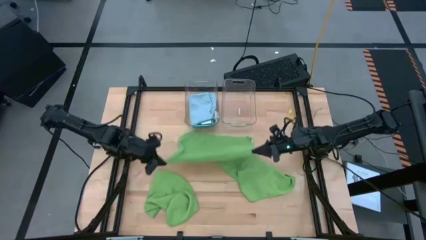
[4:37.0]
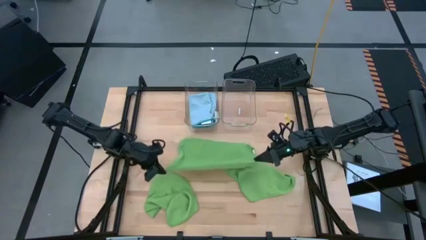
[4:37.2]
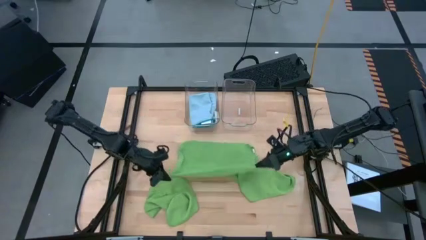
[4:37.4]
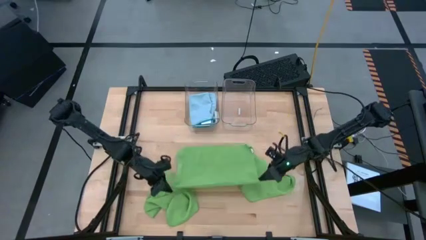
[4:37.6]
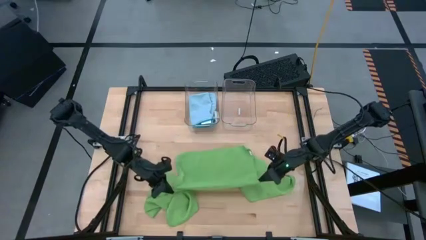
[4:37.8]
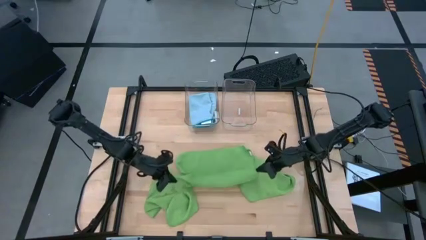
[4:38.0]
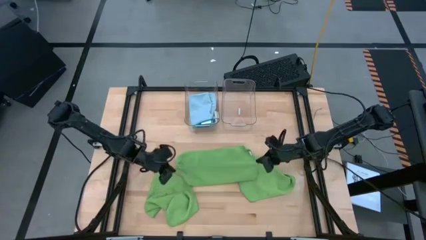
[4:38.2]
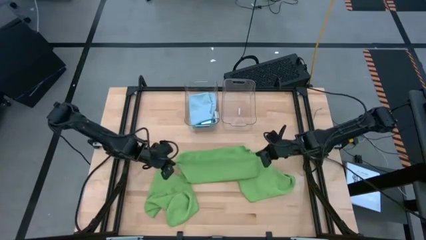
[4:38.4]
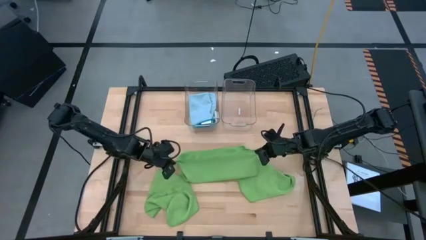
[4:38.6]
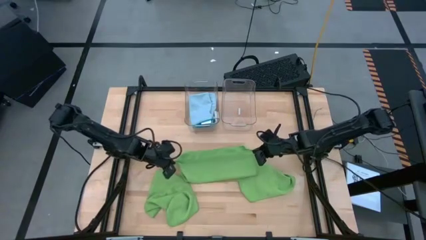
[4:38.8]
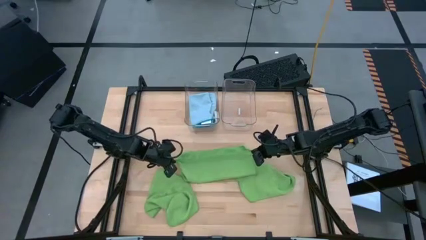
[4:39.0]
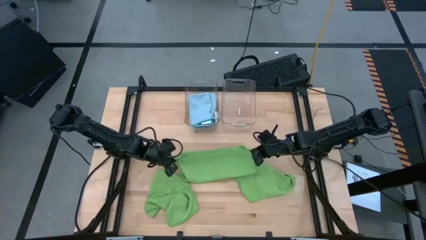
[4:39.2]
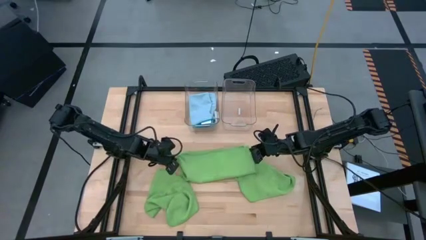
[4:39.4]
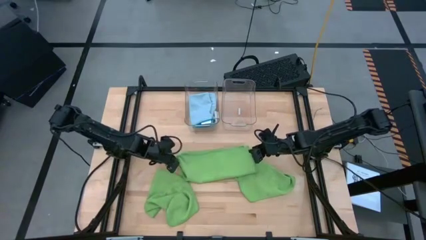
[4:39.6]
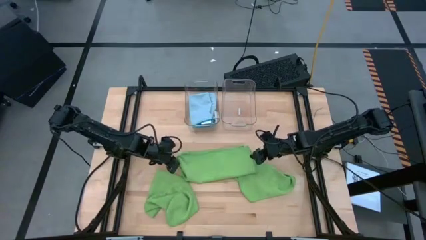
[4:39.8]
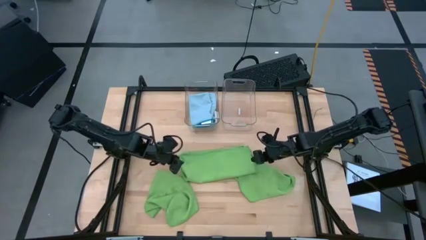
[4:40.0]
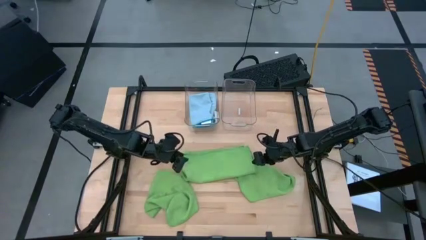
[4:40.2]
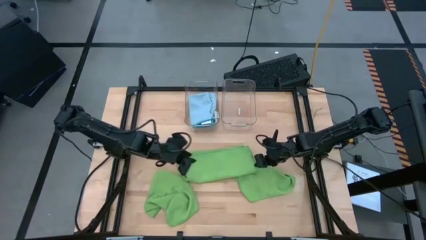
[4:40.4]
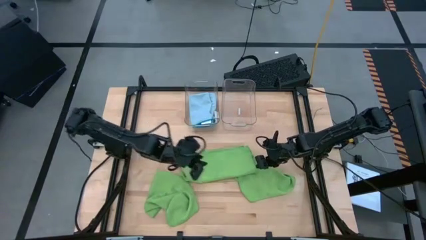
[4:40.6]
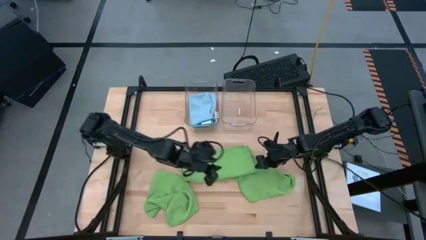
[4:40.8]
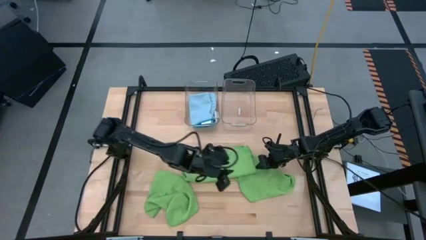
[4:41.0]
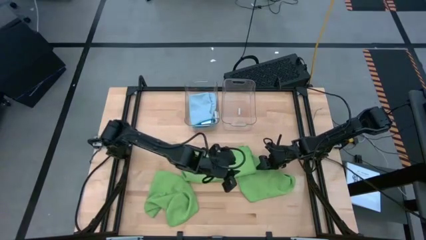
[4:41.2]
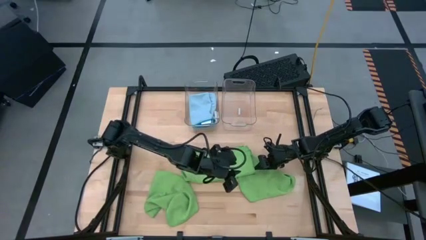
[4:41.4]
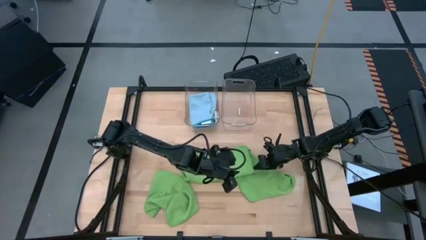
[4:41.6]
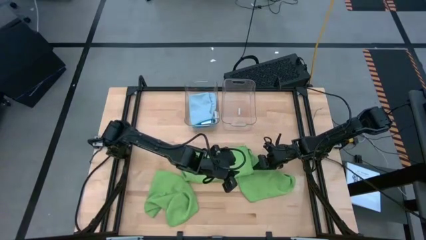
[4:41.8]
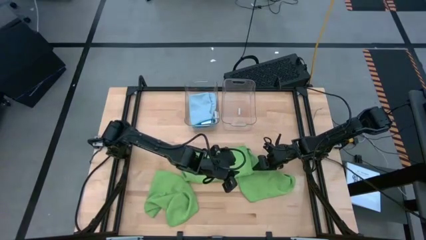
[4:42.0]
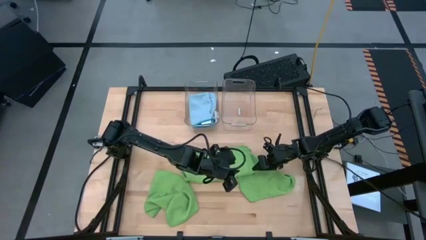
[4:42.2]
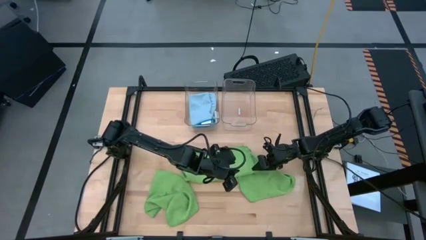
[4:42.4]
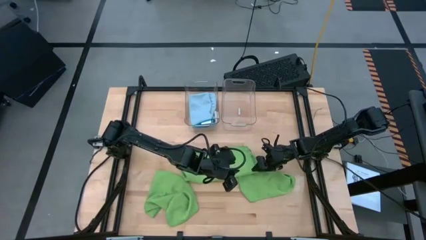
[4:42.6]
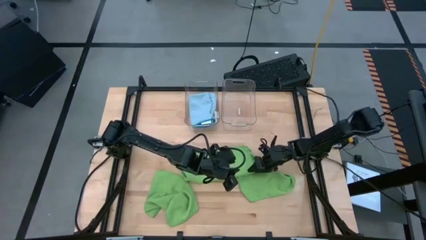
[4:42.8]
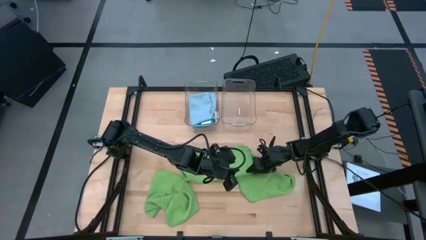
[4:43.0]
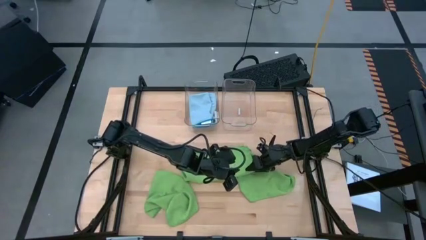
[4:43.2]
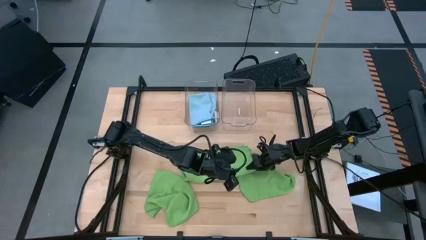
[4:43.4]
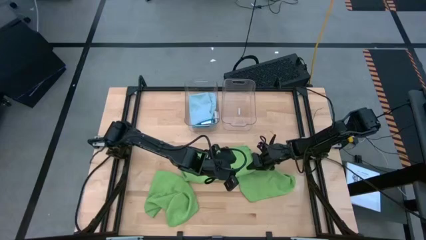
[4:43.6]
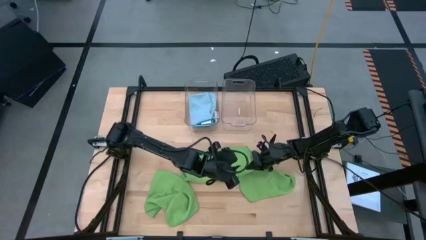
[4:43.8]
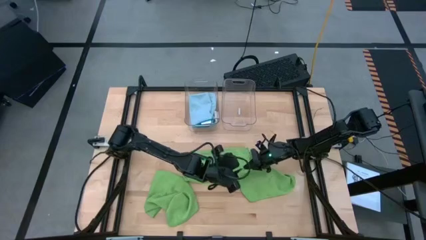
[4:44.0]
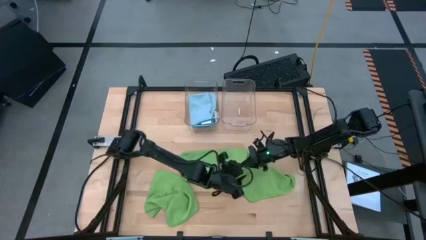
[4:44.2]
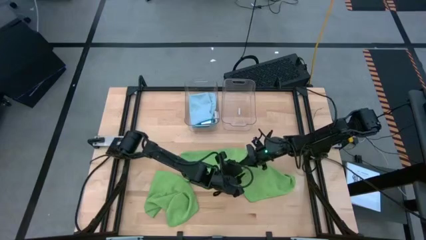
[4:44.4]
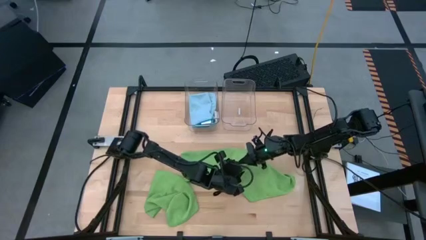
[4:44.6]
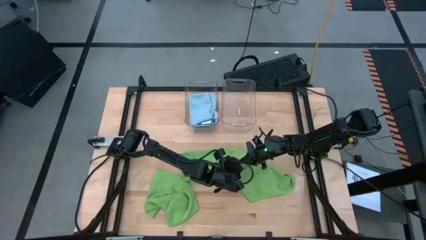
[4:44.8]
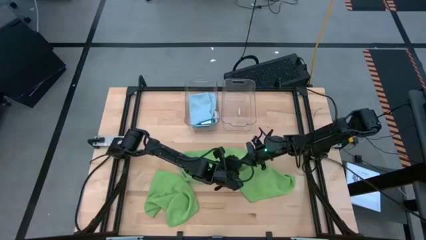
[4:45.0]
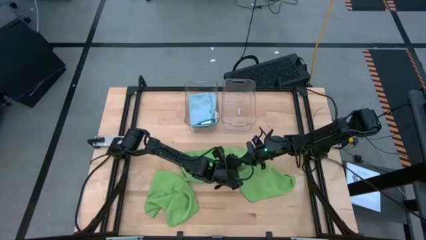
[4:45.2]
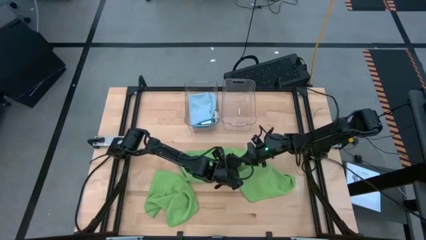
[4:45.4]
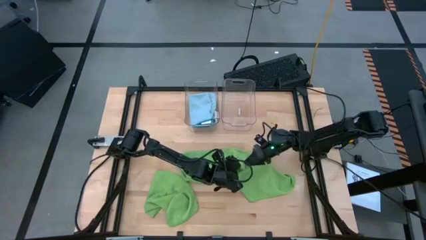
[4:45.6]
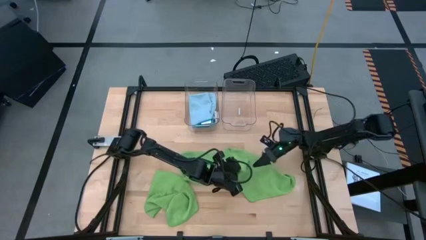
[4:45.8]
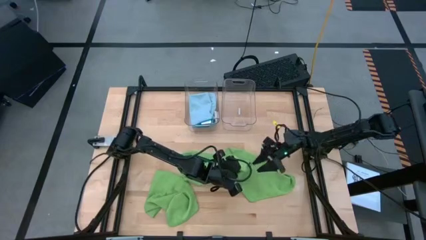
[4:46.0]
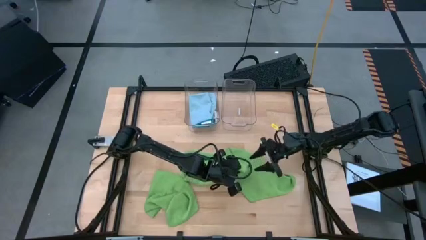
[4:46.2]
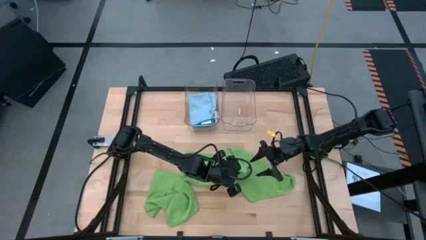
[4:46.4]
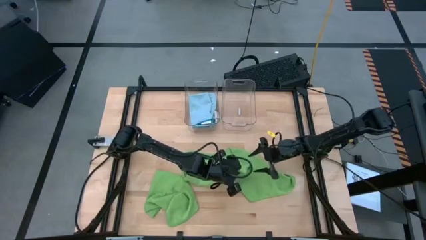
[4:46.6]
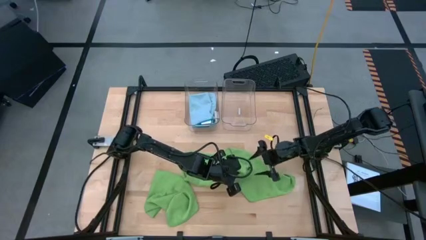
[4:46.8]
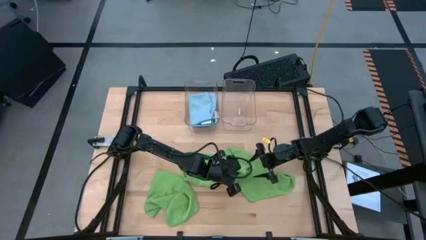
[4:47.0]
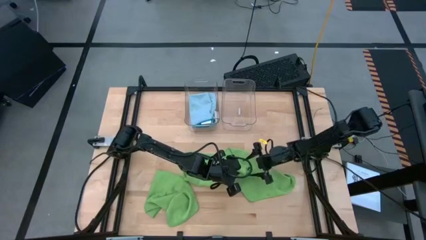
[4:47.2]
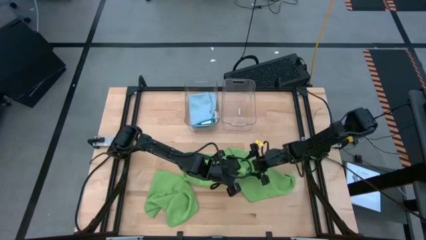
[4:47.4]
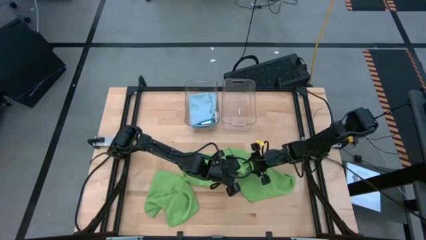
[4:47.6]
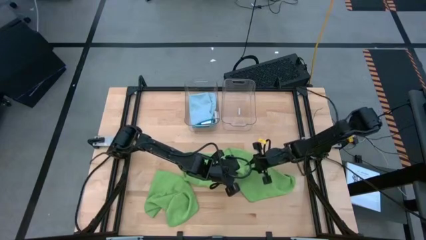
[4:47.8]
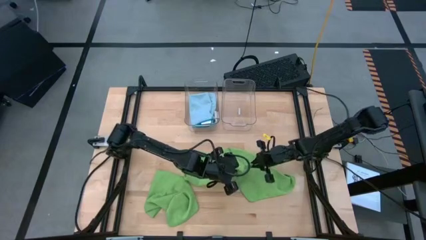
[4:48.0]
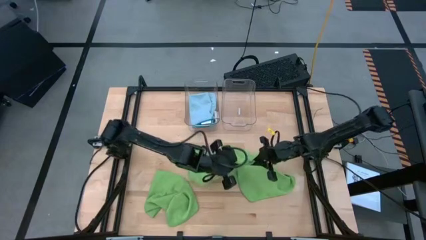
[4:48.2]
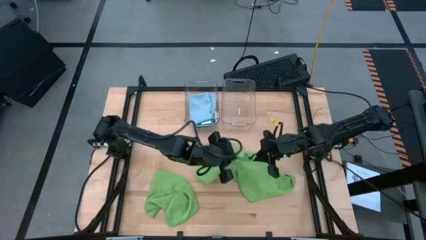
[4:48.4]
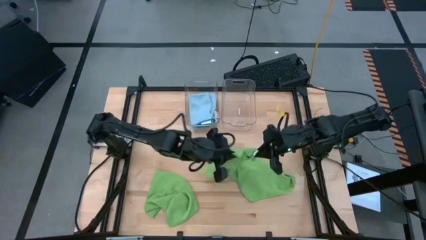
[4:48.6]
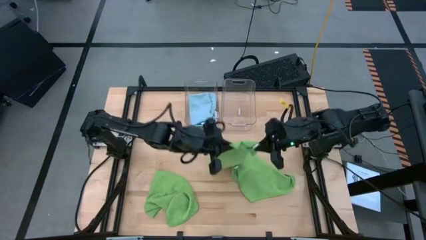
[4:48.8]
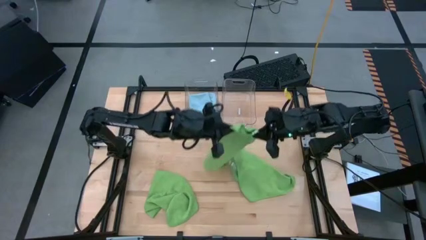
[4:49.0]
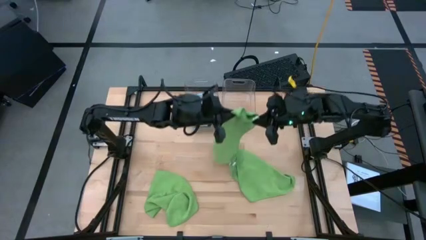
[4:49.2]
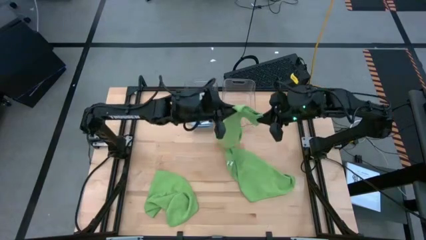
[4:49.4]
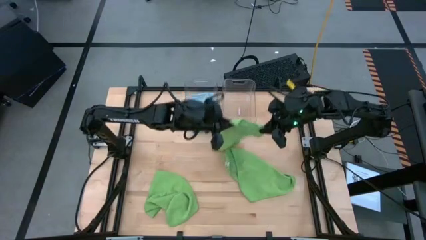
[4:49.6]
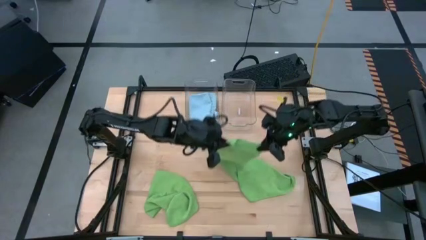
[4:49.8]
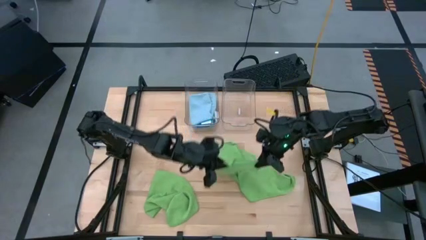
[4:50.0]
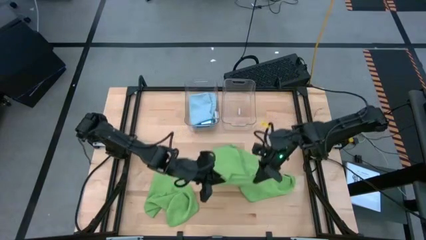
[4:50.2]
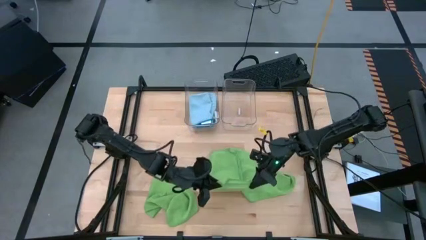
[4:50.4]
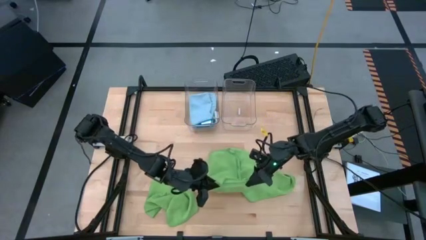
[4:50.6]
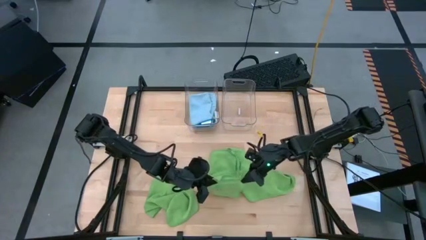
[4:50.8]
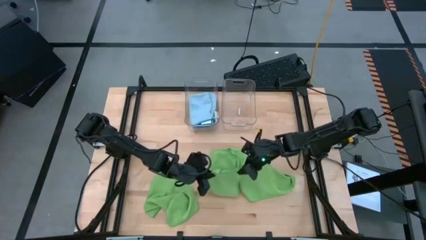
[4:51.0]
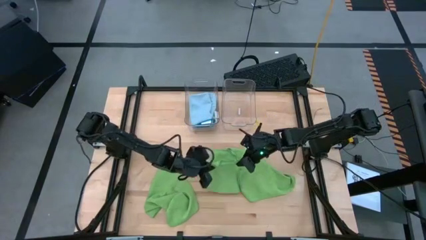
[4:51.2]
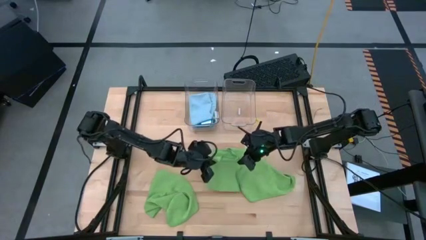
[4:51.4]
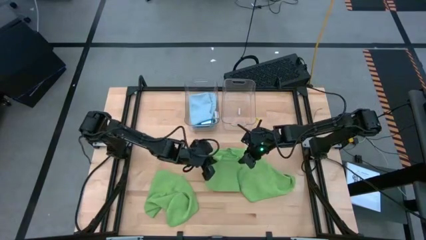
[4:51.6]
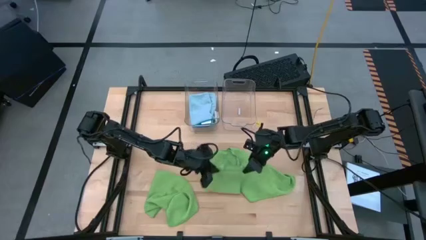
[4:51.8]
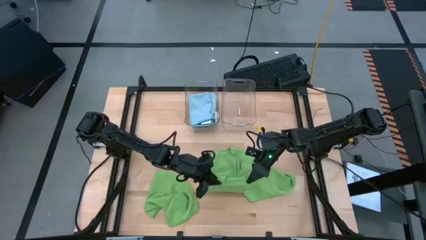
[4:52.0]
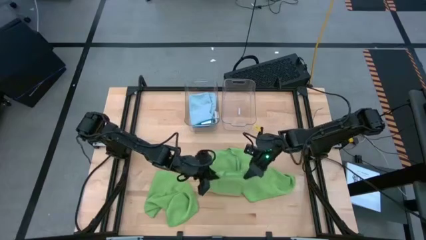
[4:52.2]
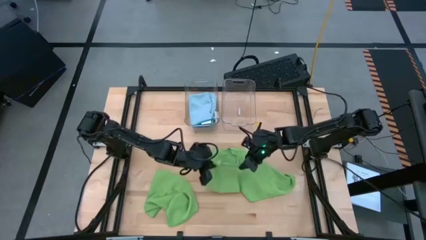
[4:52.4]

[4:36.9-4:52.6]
Task: Fold microfiber towels
Fold the top left green microfiber towel
